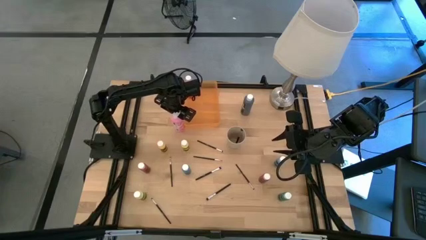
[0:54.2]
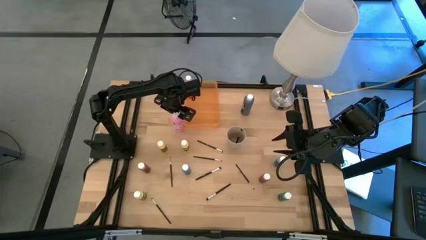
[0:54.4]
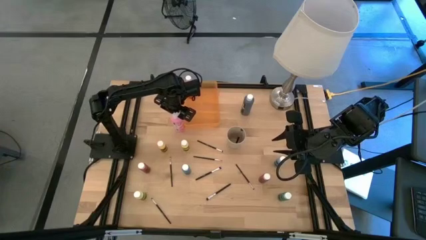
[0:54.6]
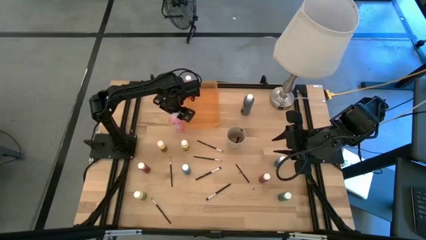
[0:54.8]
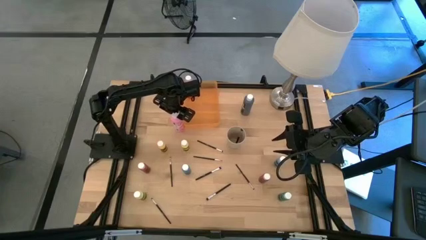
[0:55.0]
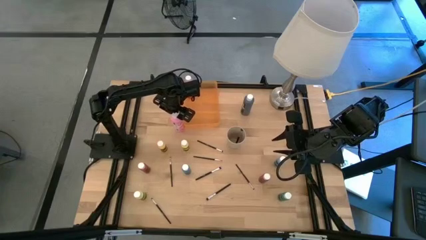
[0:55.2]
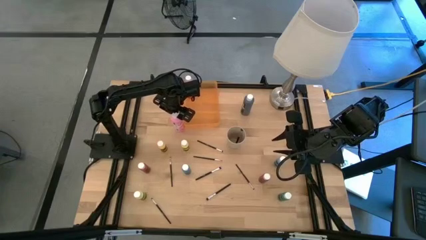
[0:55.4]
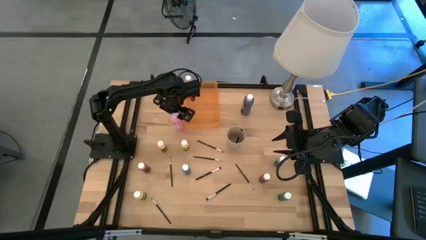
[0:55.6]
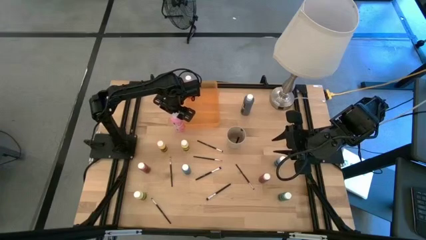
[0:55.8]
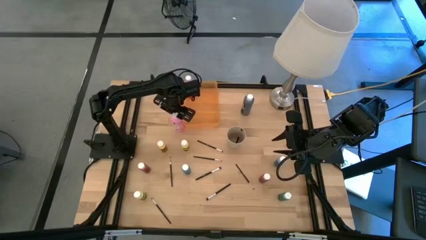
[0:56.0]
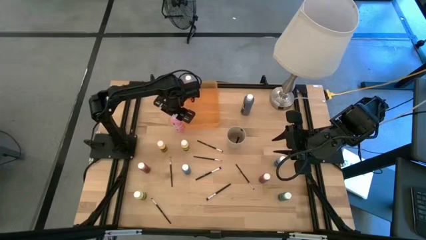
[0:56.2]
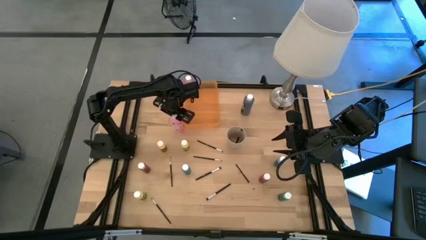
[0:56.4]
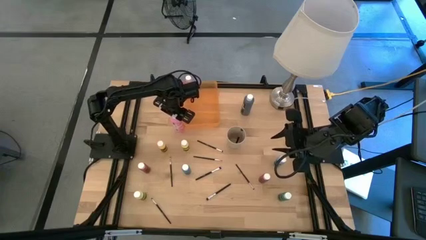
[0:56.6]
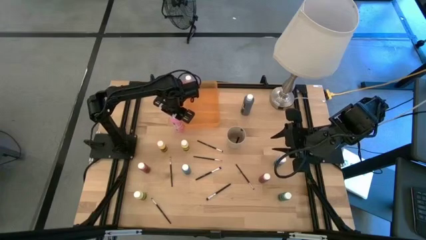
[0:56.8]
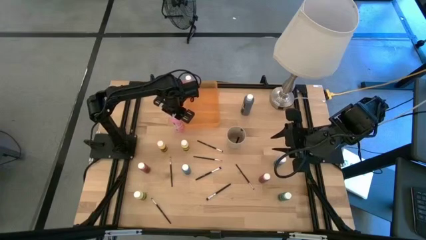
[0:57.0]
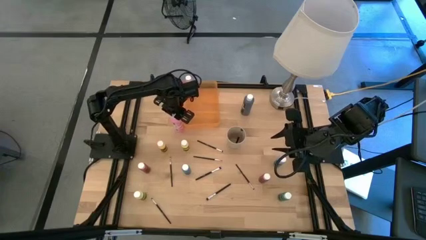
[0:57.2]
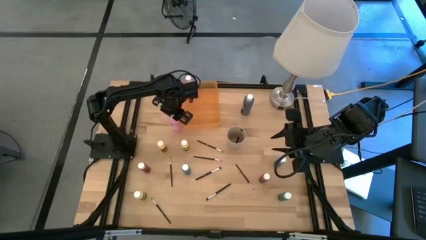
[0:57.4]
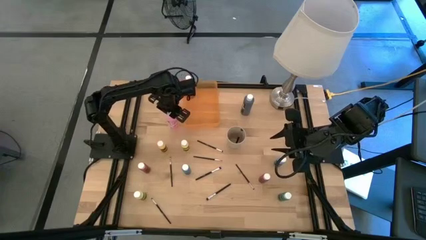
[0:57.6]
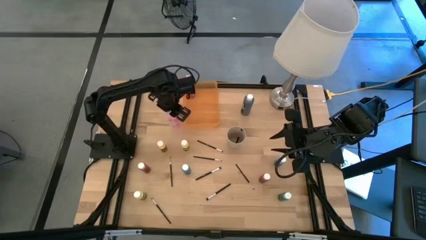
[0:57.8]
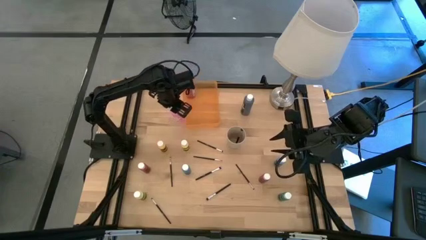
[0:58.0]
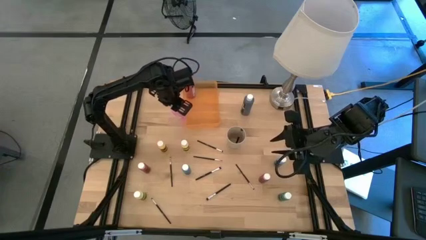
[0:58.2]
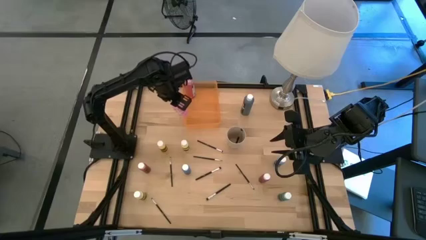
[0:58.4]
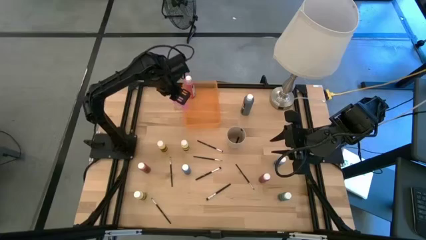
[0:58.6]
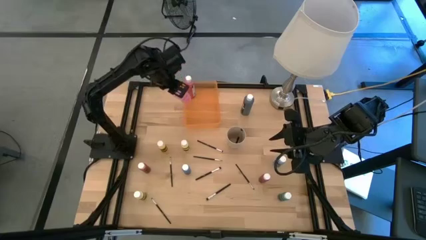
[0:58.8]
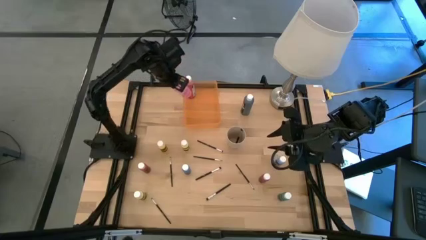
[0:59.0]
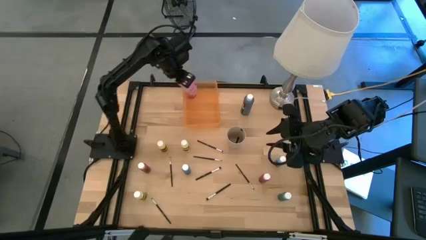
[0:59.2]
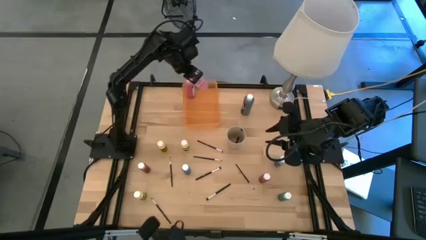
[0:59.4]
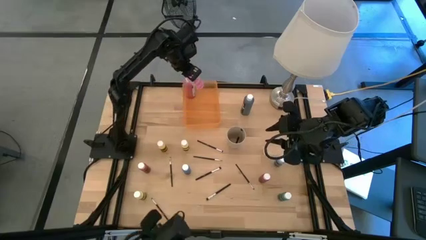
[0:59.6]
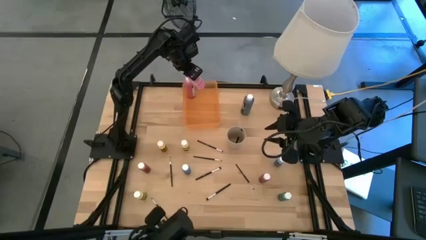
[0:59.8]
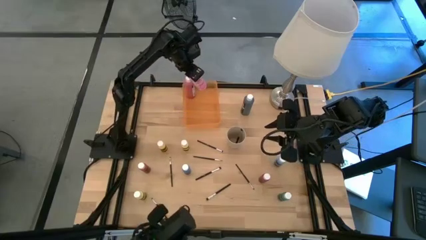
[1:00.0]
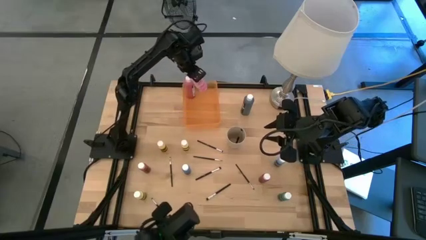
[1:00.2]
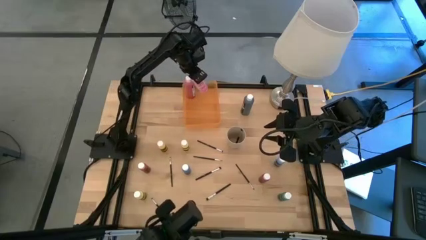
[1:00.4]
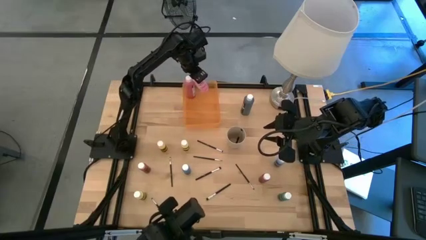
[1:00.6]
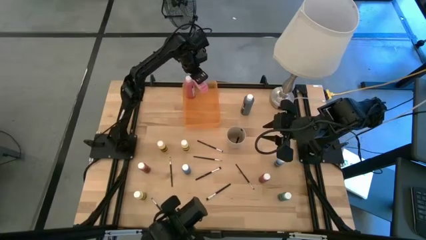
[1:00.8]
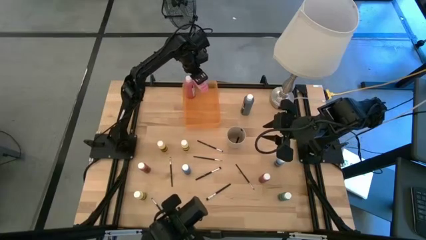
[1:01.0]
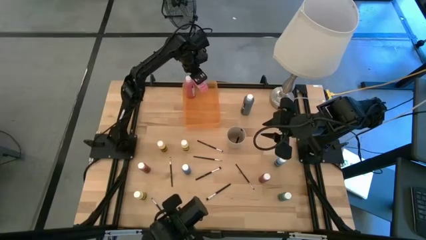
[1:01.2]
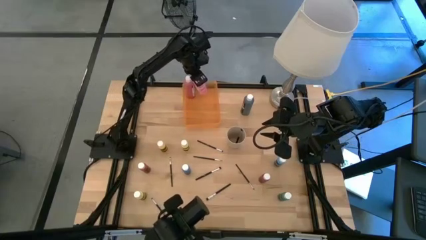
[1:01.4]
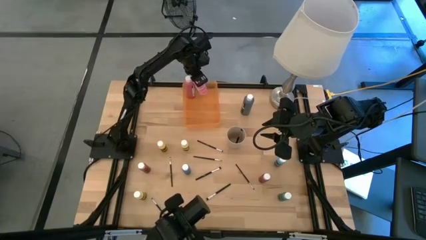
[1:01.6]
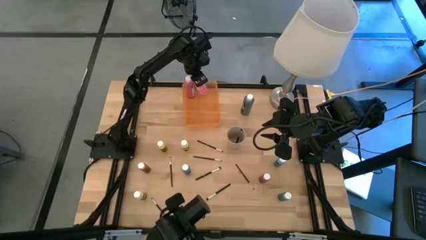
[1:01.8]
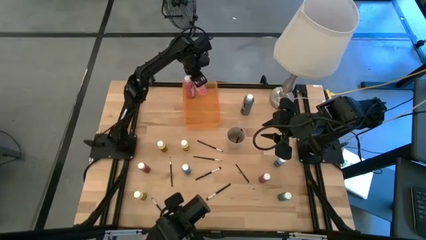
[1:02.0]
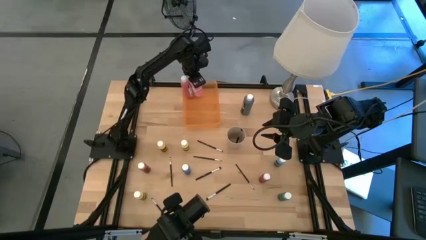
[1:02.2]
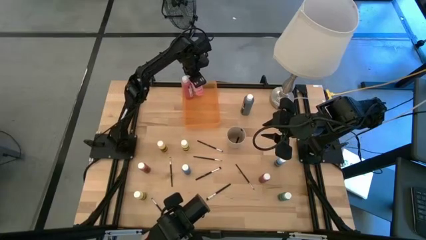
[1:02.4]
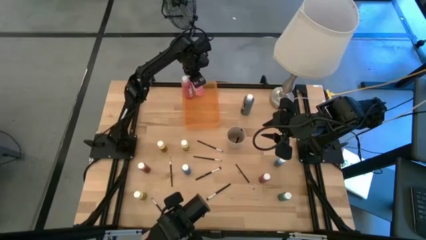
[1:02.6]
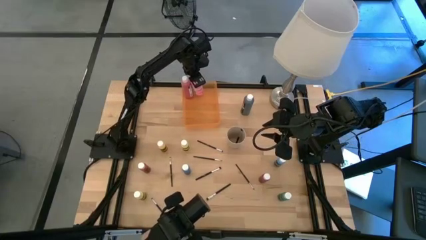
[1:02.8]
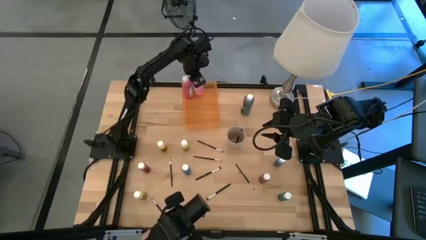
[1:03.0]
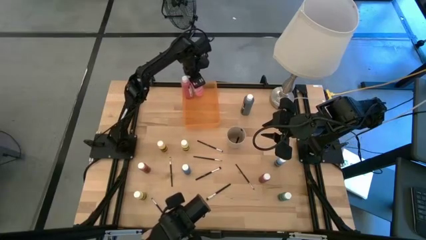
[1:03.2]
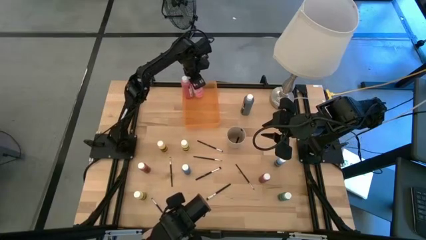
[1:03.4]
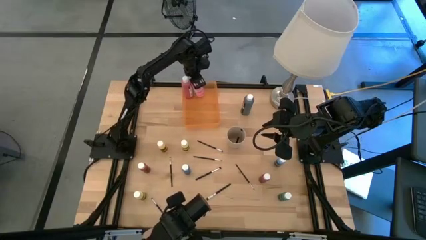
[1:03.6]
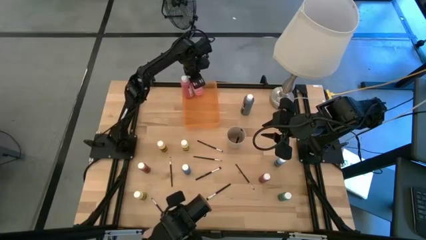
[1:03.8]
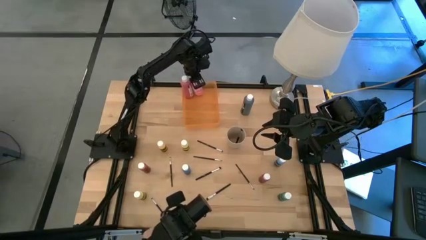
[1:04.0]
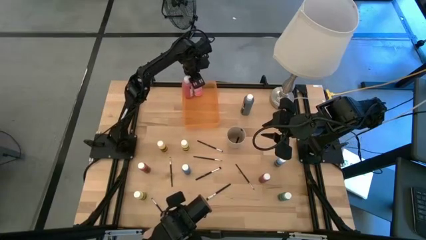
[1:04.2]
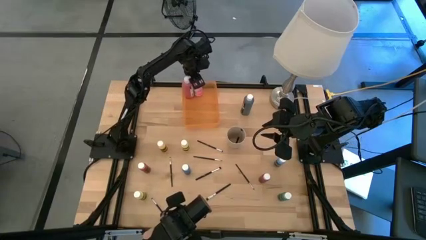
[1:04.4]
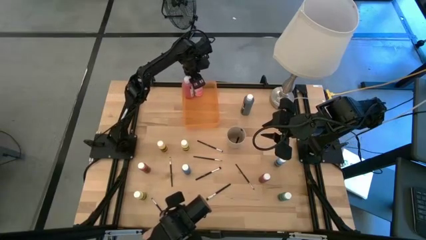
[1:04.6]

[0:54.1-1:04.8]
Task: Pick & Place Paint Supplies
Put the large pink paint bottle into the orange bin

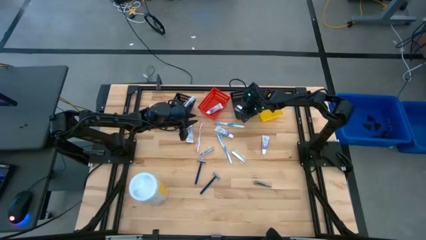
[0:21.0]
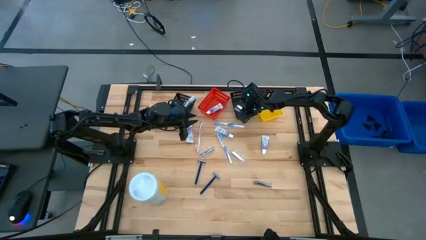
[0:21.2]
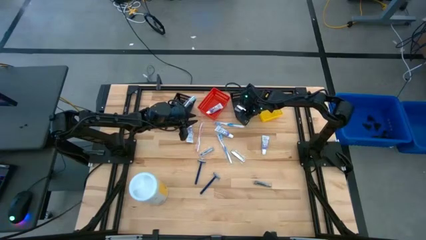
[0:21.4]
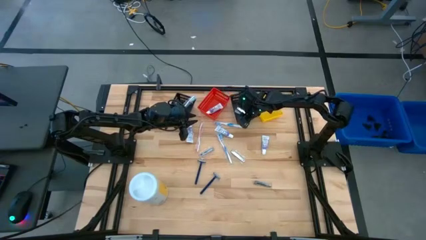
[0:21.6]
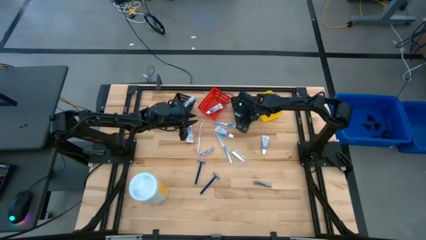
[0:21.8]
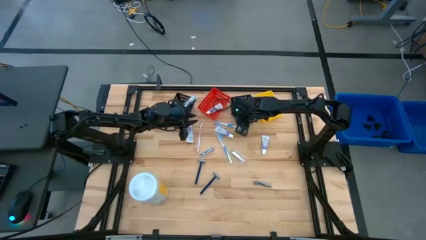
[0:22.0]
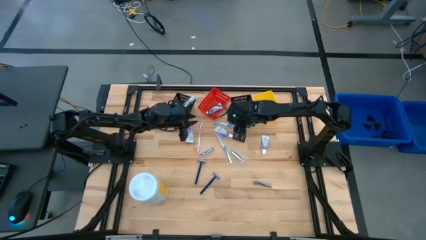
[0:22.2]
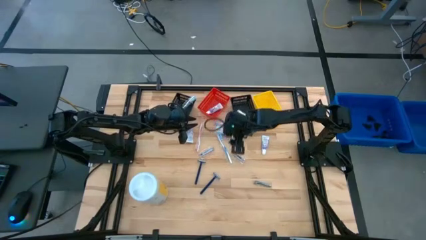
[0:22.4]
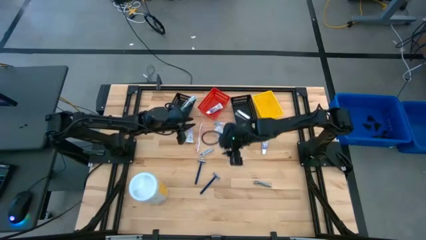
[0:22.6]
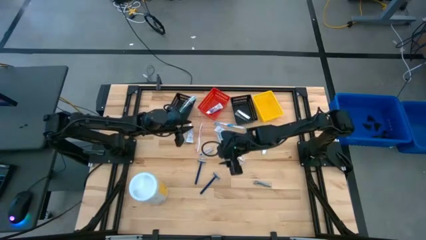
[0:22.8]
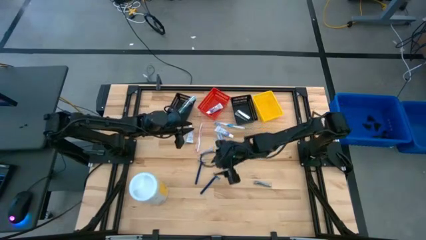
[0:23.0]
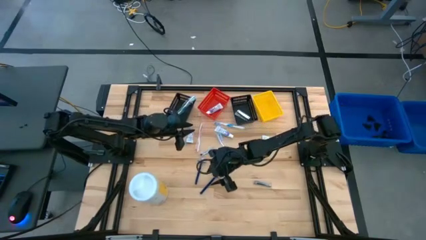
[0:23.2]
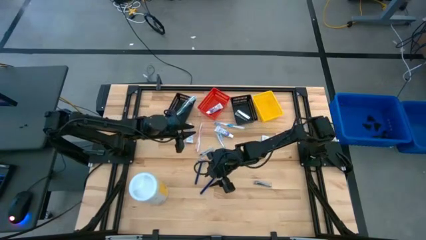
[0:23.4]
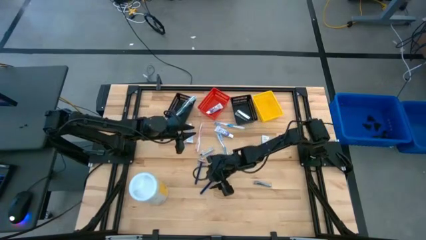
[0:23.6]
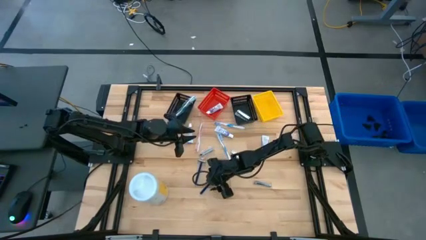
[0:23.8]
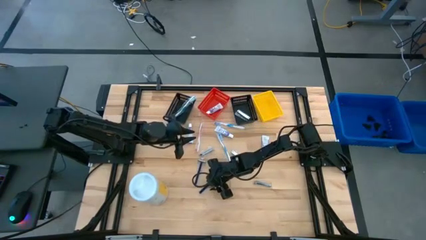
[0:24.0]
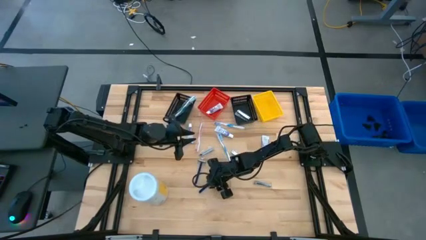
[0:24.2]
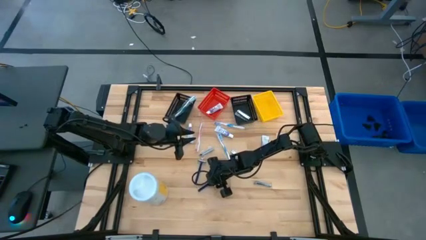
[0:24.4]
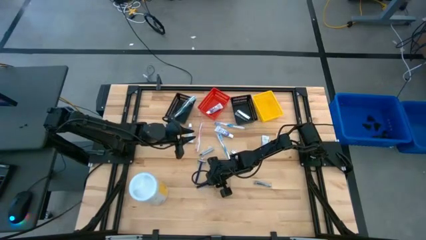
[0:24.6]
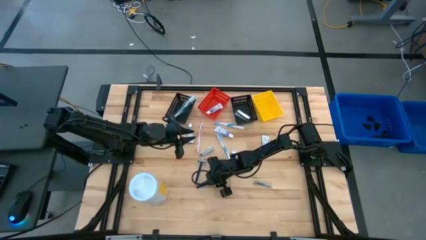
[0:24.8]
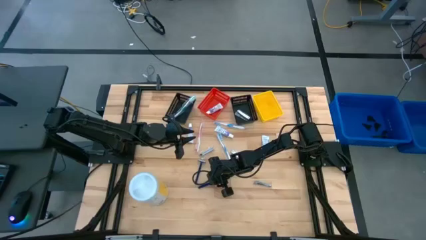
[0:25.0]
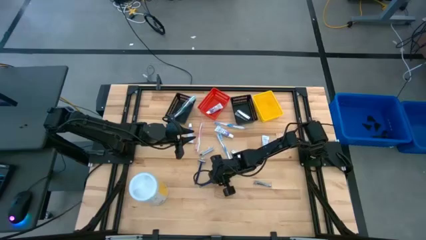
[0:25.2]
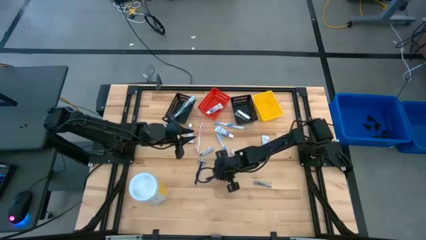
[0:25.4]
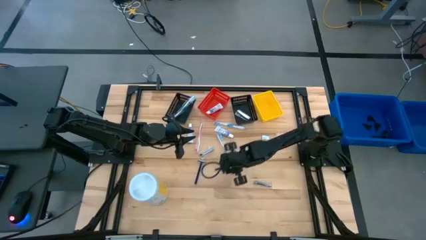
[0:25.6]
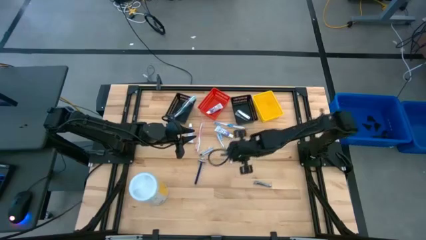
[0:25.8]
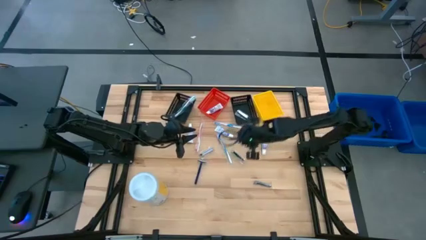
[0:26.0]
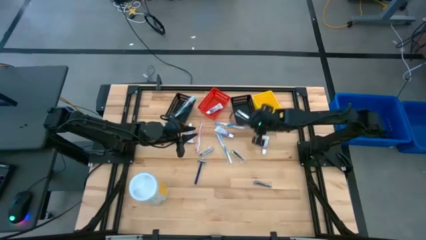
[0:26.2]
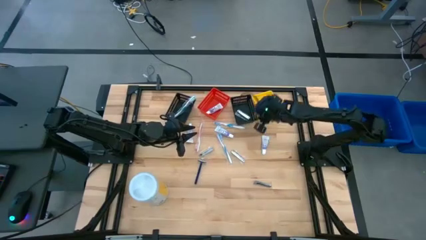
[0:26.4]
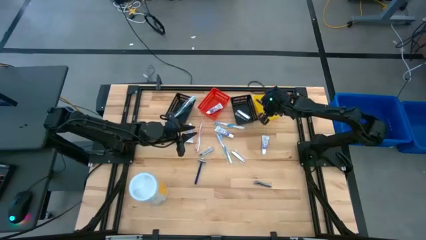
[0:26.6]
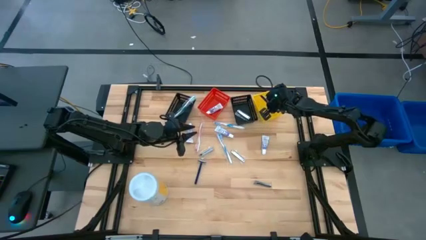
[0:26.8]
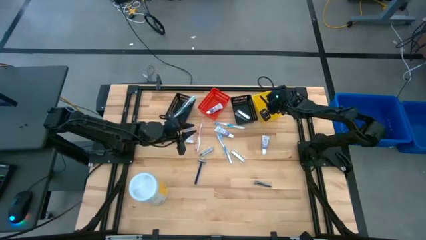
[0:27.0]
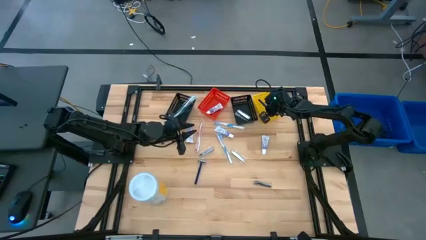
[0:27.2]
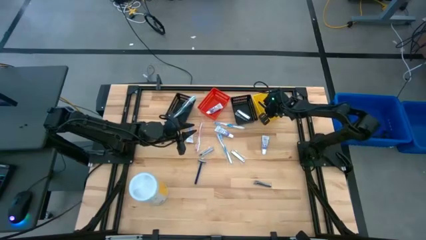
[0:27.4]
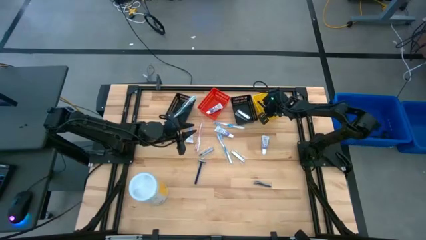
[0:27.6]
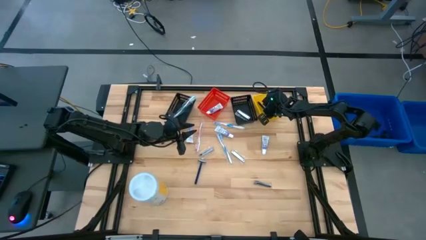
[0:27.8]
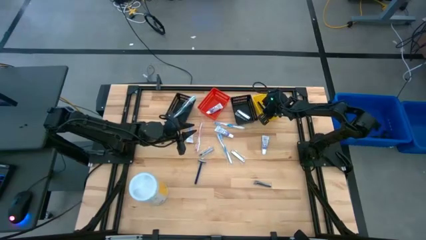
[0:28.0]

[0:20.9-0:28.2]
Task: Pick & Place Travel size toiletries
Put the right razor into the yellow bin
